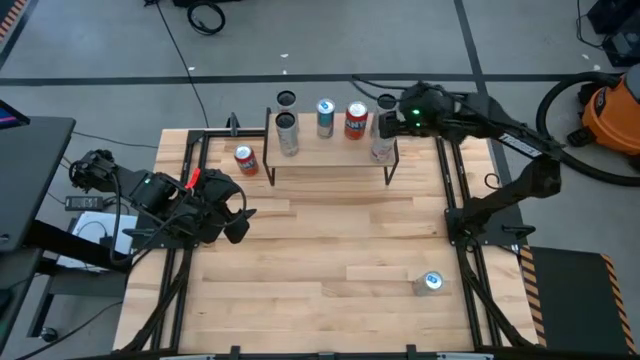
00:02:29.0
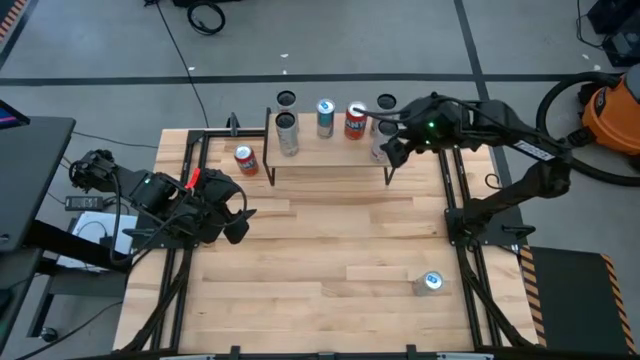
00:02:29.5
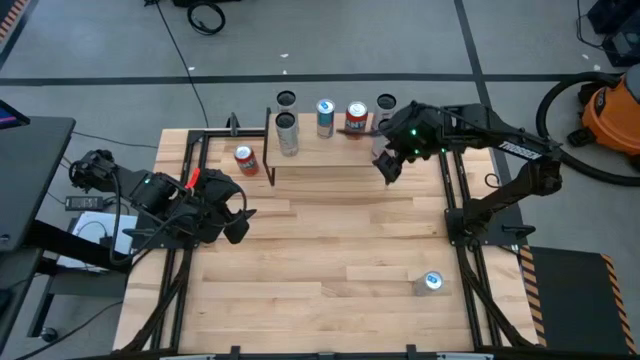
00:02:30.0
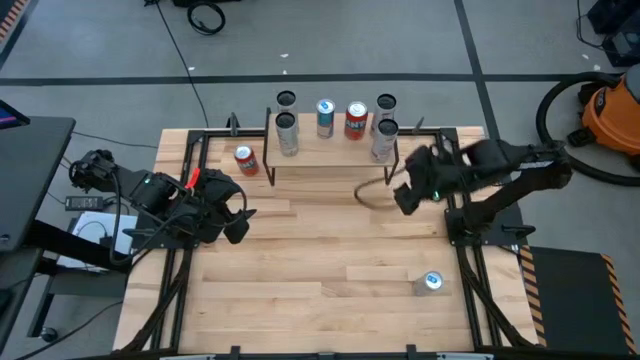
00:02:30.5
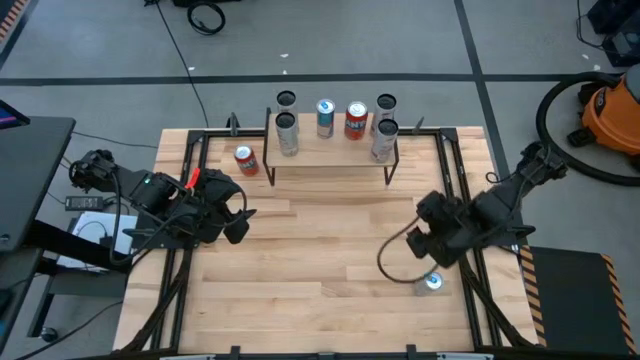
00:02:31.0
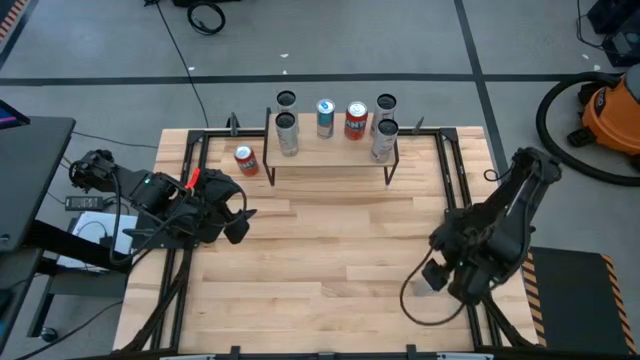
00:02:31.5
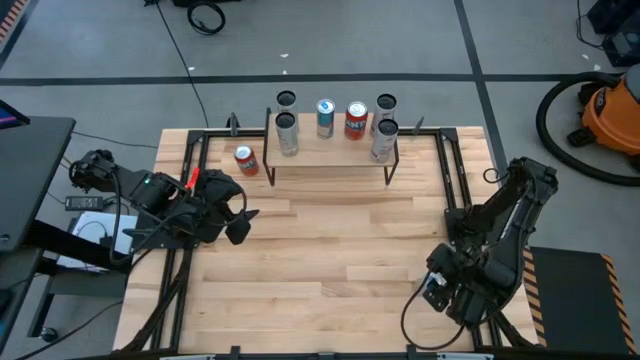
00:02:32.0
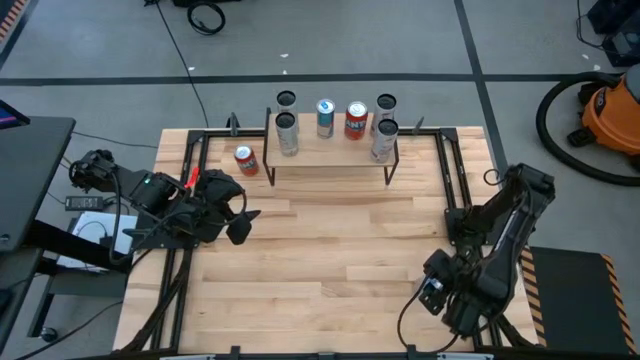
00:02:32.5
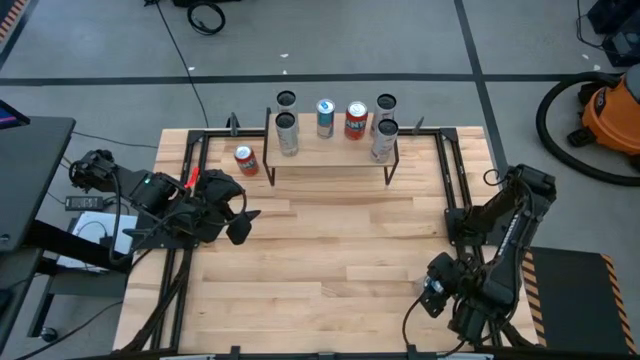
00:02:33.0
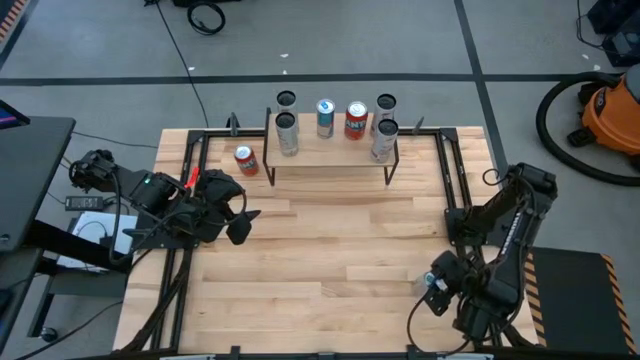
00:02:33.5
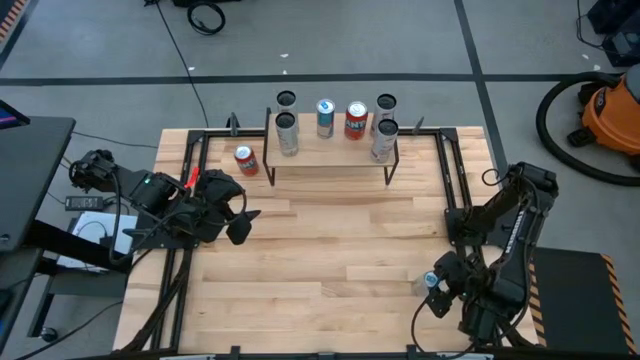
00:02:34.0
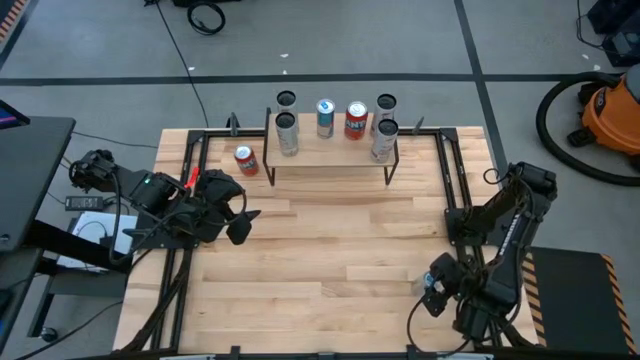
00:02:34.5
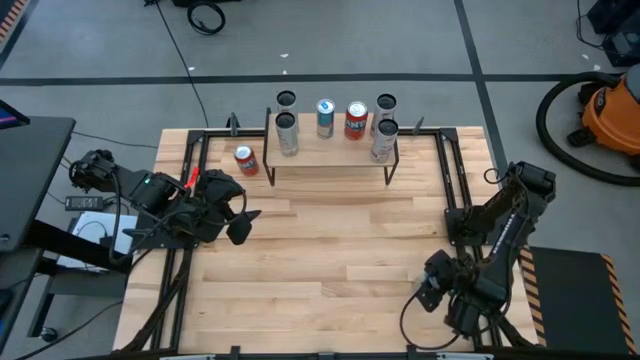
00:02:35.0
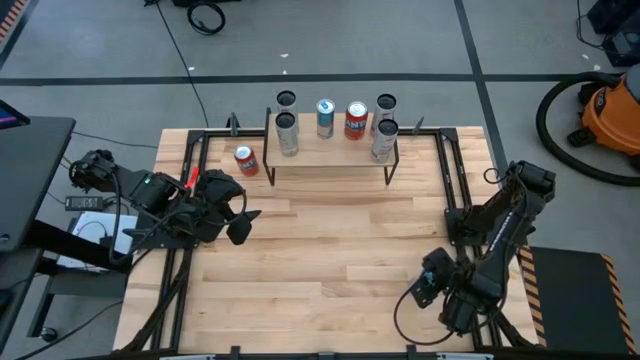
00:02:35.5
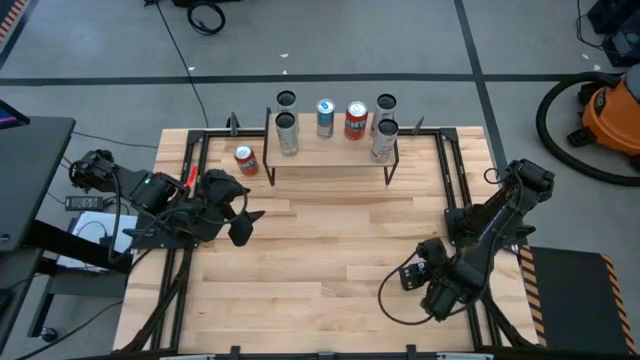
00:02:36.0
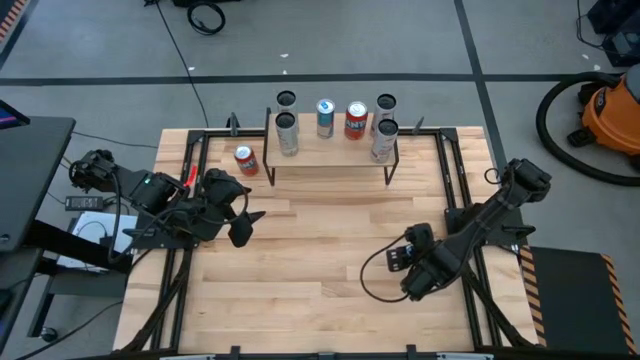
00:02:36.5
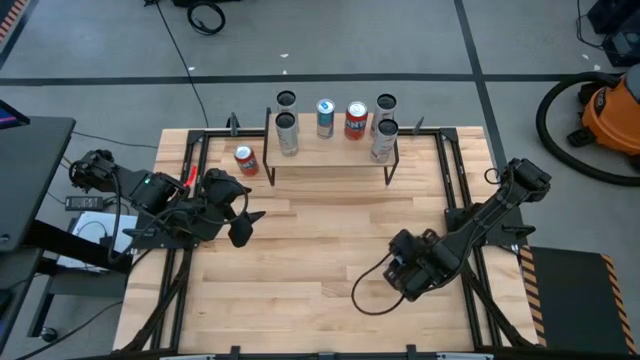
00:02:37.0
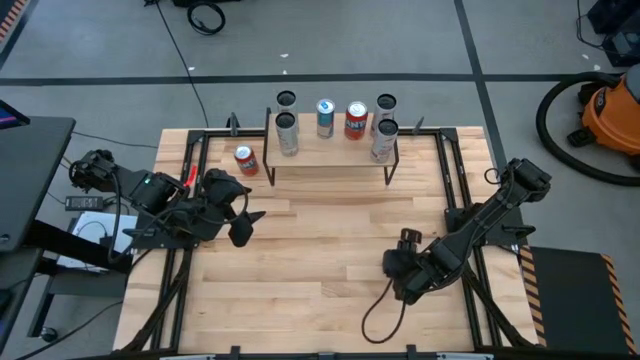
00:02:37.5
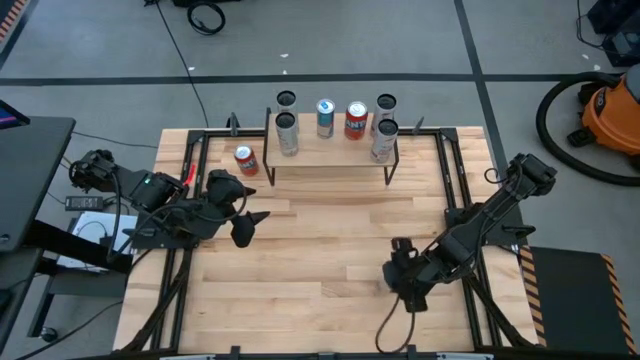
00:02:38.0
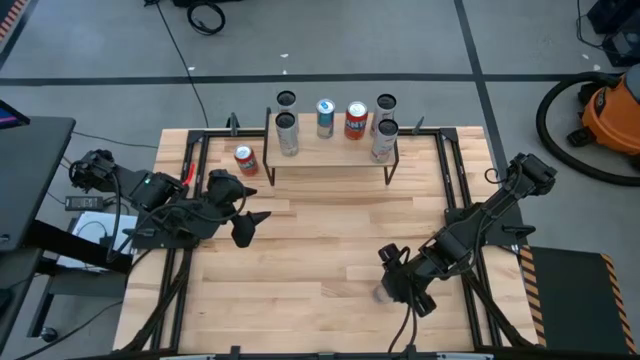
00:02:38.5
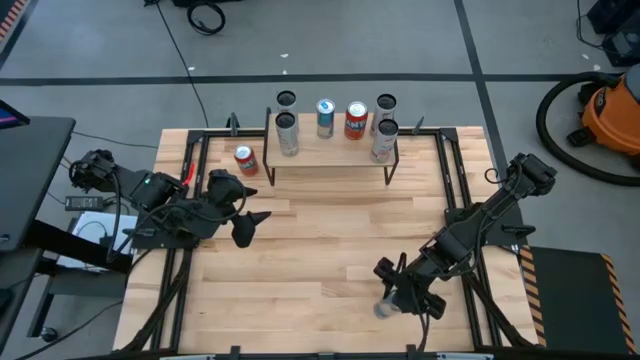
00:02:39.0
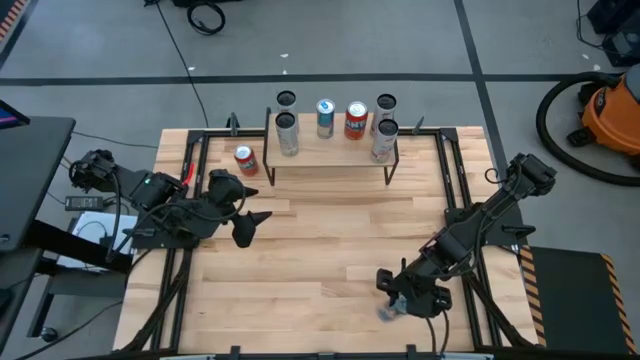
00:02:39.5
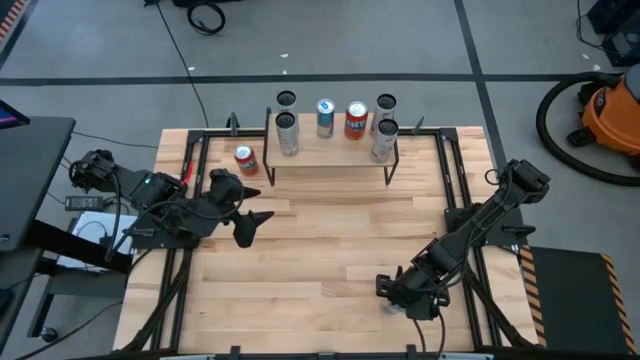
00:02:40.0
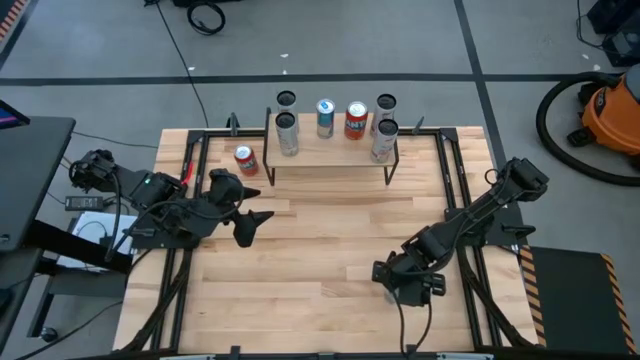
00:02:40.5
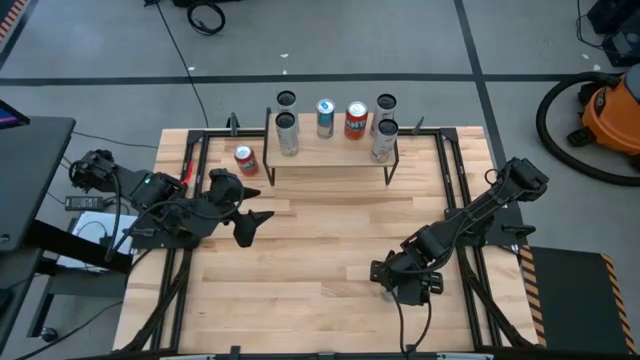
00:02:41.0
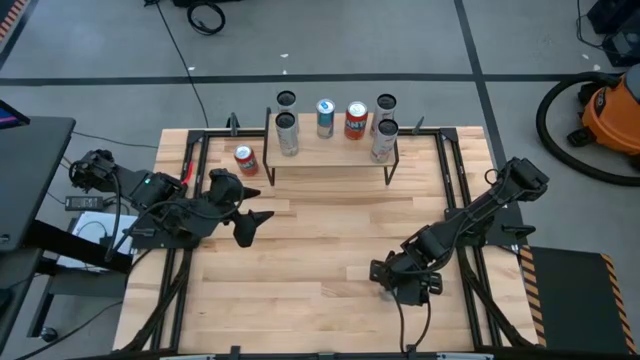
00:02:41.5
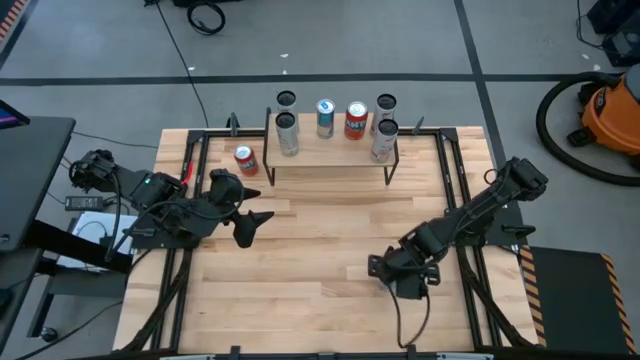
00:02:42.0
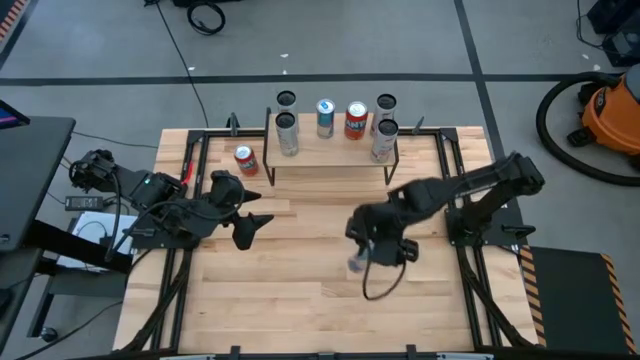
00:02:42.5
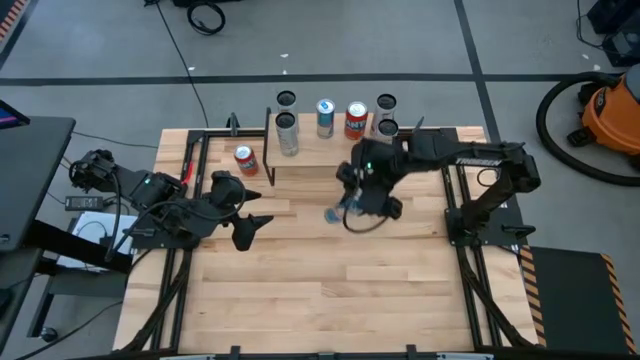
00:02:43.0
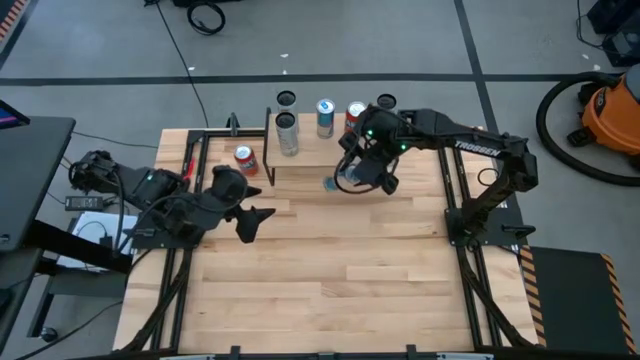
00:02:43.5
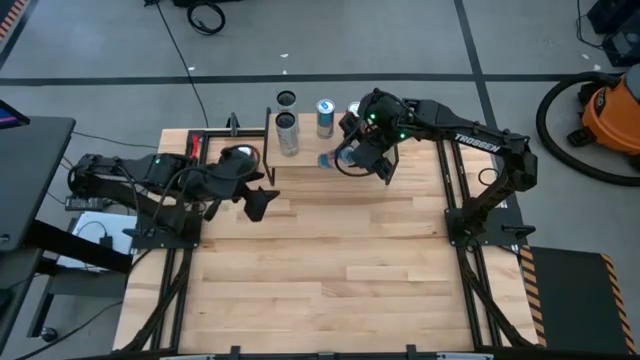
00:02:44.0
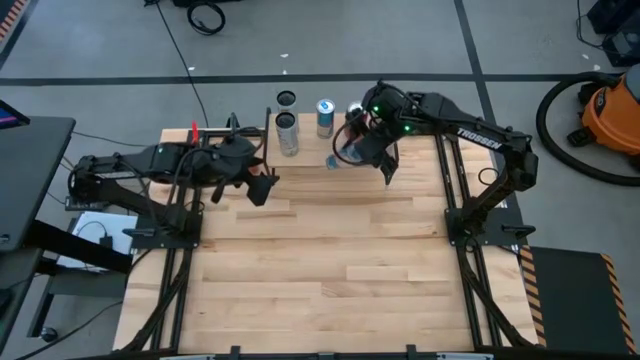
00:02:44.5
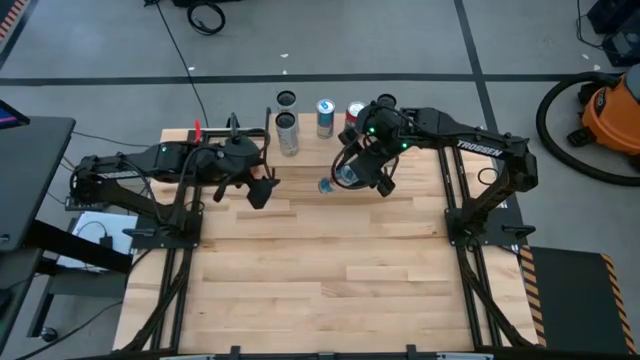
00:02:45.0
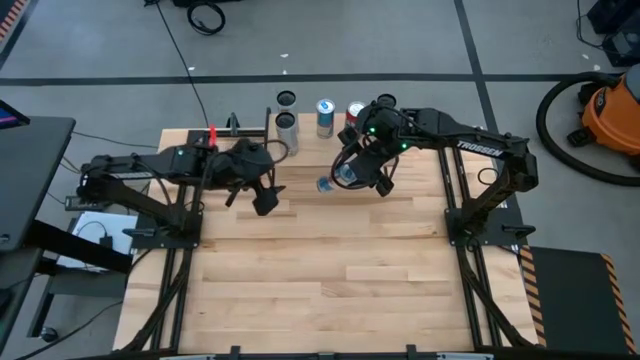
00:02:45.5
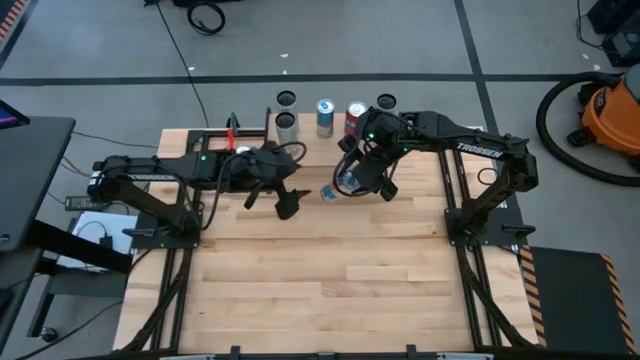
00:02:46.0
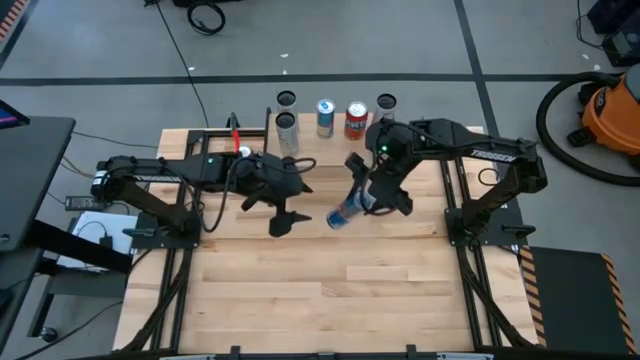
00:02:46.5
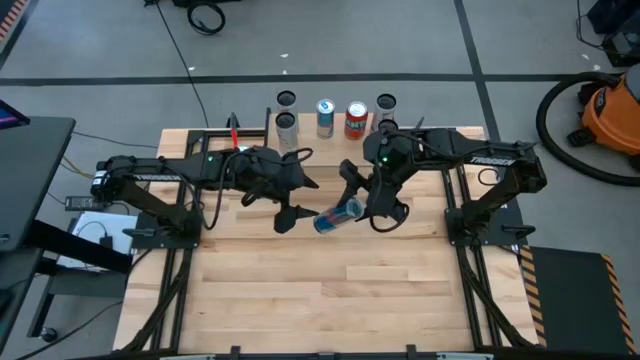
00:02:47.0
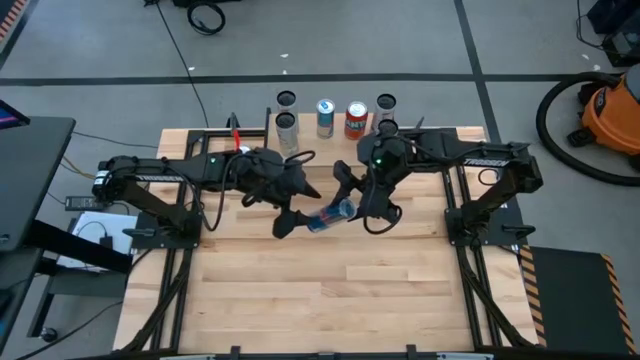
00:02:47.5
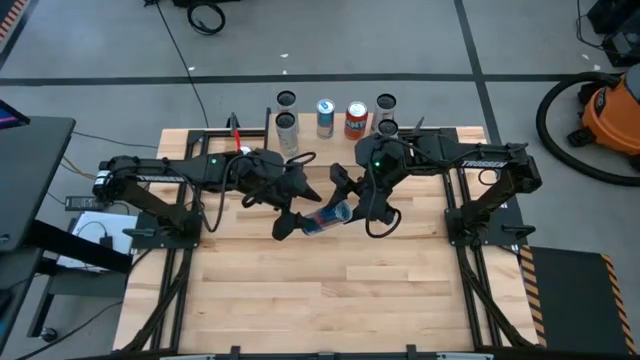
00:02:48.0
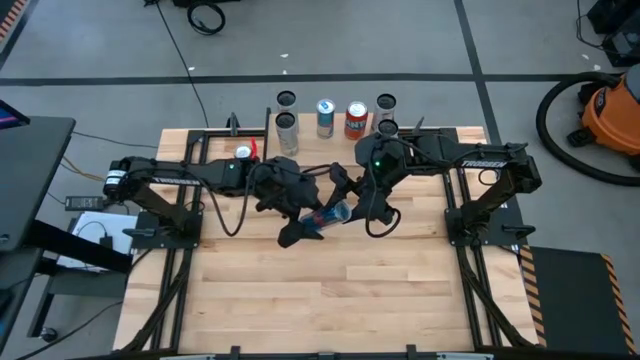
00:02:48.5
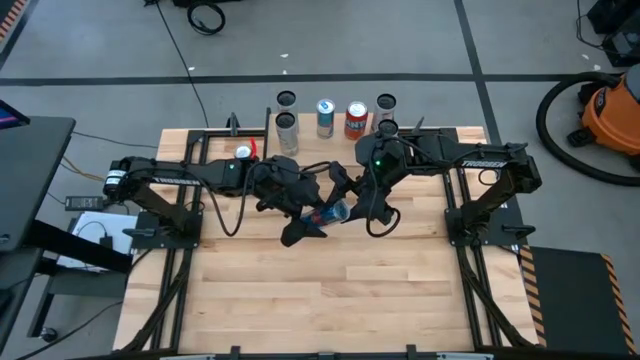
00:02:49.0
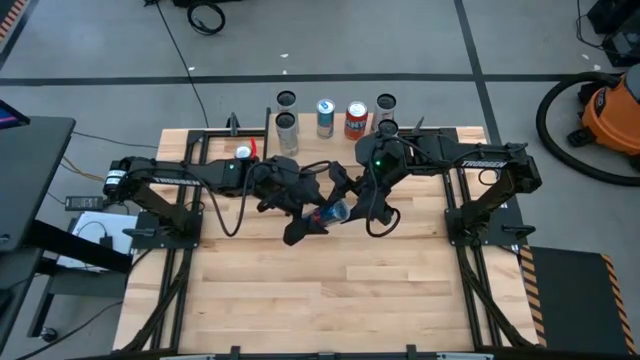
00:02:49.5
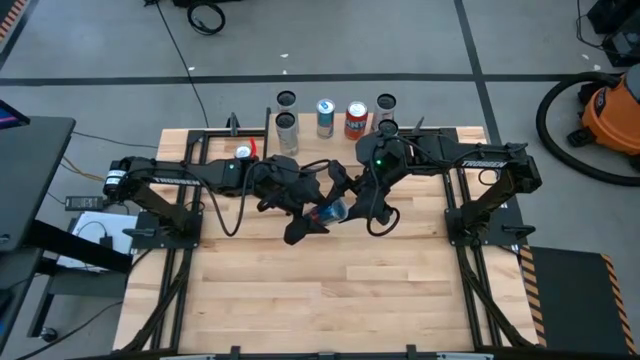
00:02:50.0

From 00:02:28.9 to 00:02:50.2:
Task: Place canned beverage on shelf
Put the blue soda can on the shelf aligned with the other blue soda can

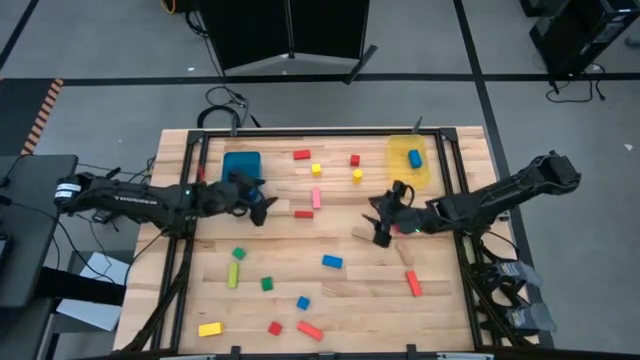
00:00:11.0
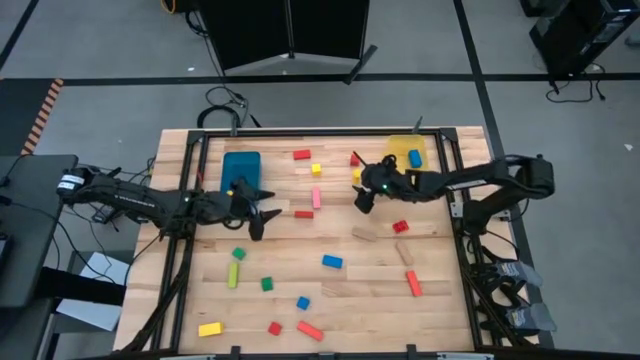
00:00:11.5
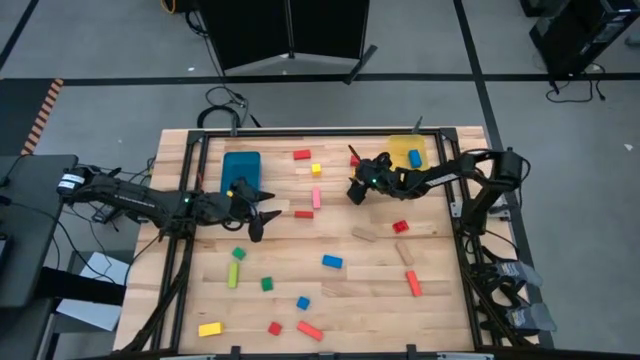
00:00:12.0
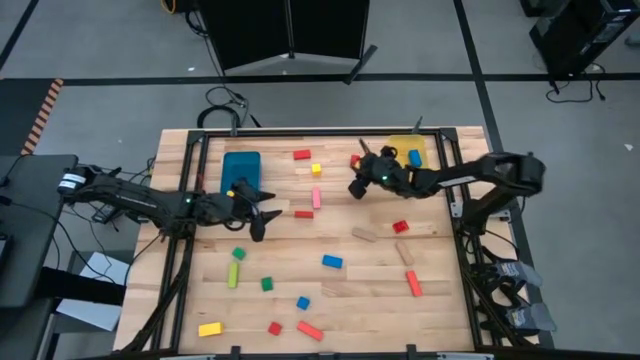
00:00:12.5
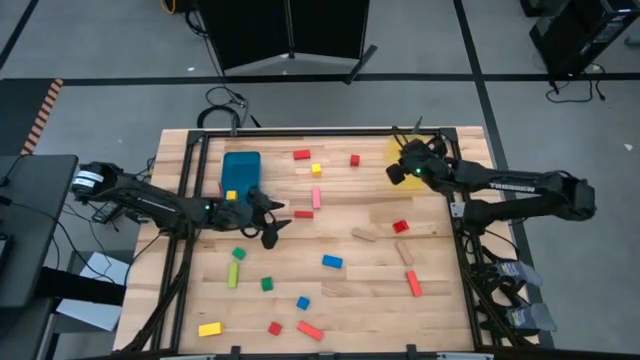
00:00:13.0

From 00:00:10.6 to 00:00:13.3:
Task: Sort blocks by size
Put the large yellow block into the yellow bin
